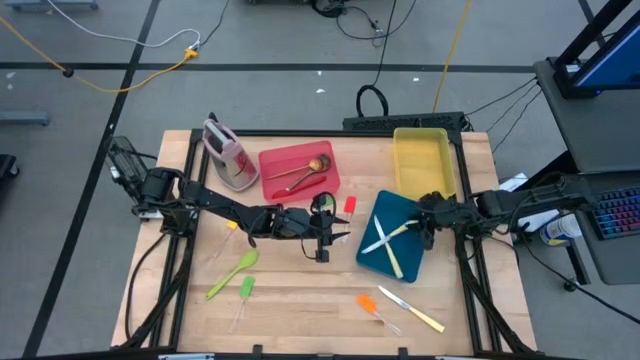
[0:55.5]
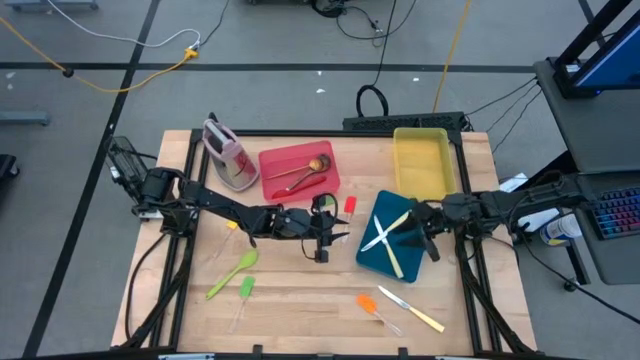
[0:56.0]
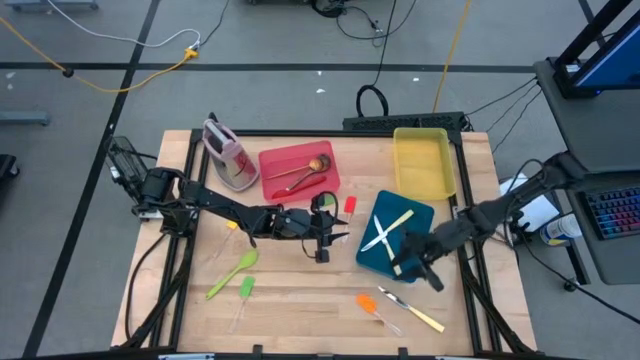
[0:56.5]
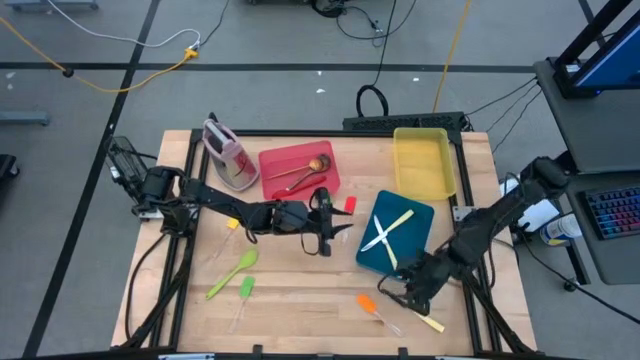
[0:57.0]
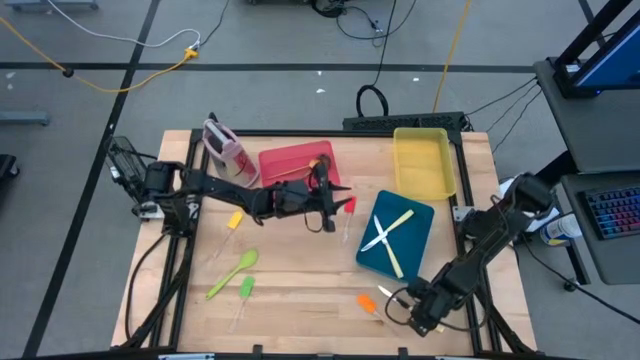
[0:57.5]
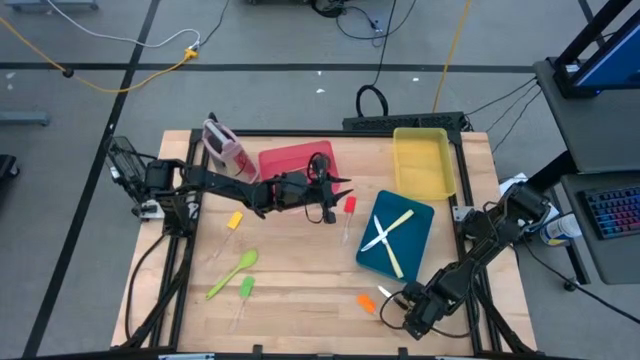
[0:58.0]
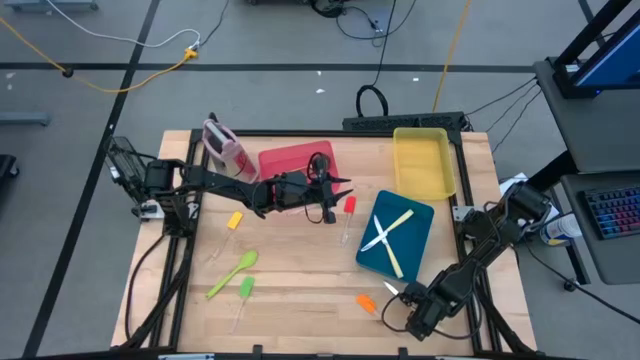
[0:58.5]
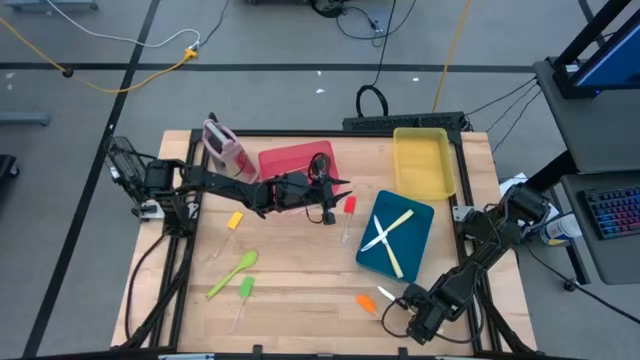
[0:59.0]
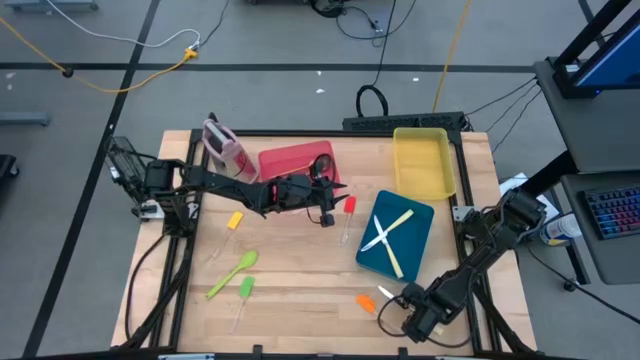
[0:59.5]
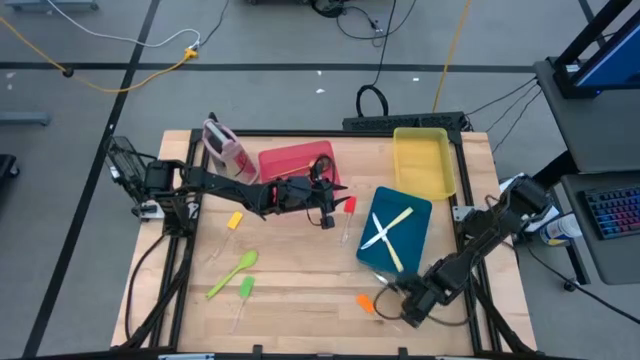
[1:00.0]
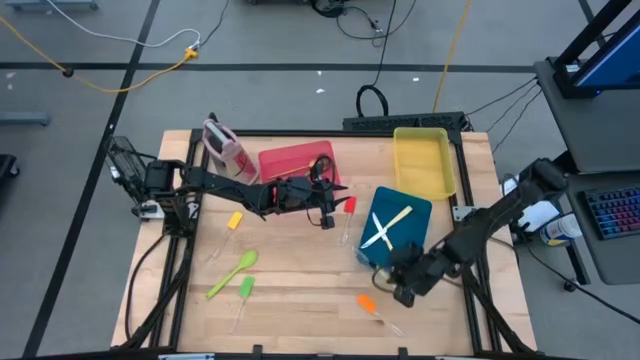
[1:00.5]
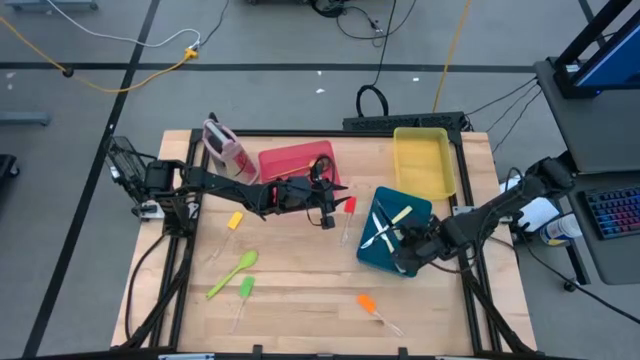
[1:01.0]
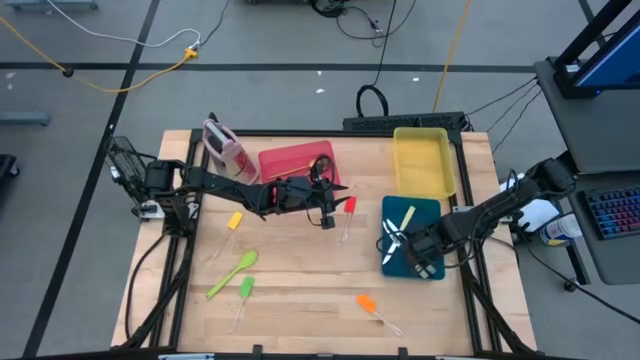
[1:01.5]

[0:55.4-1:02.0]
Task: Pick & Place Kitchen Items
Put the yellow knife into the blue bin

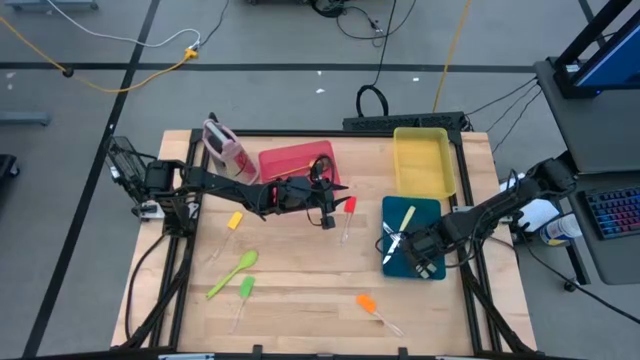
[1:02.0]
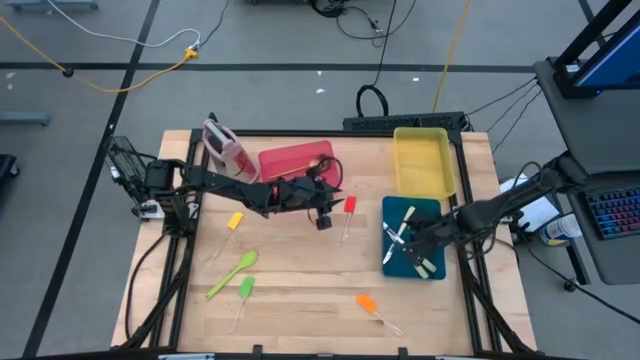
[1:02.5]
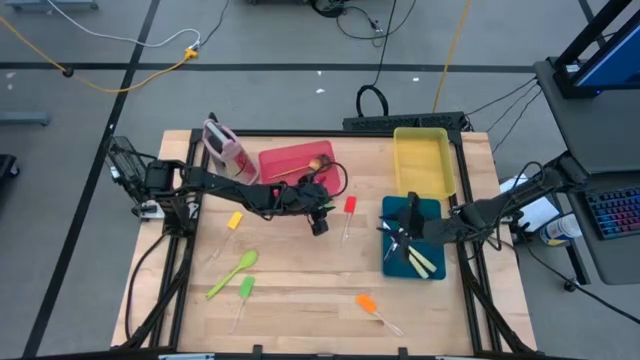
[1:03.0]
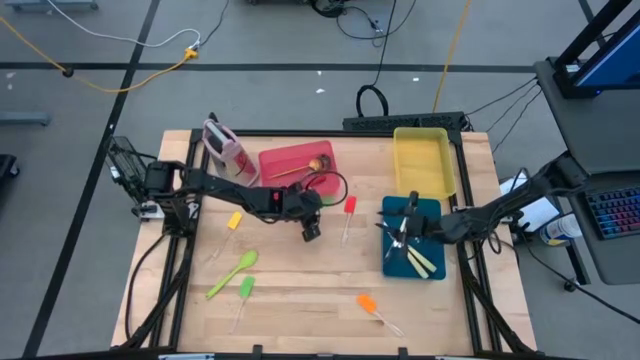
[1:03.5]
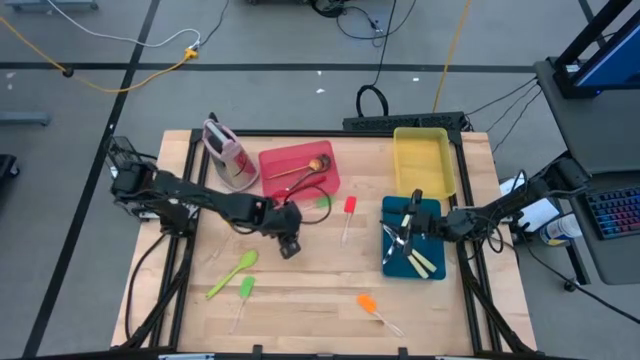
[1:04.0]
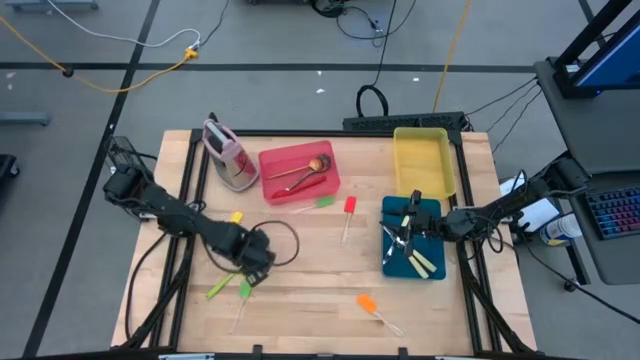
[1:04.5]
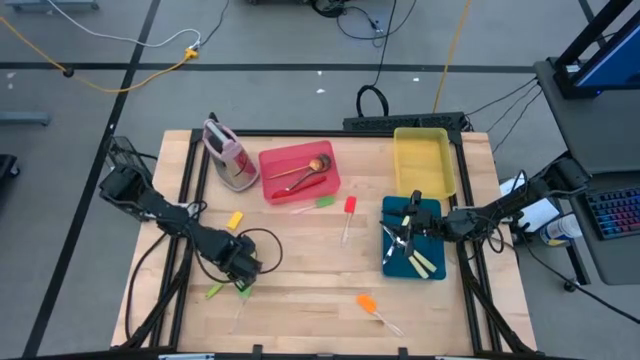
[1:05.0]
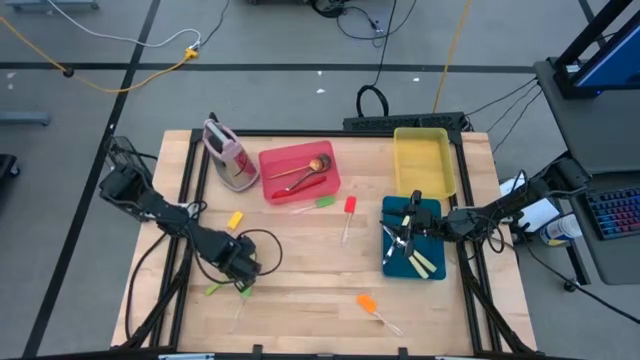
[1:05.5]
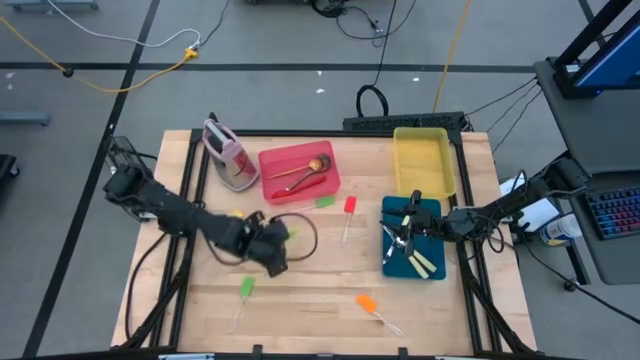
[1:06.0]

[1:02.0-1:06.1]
Put the green serving spoon into the red bin

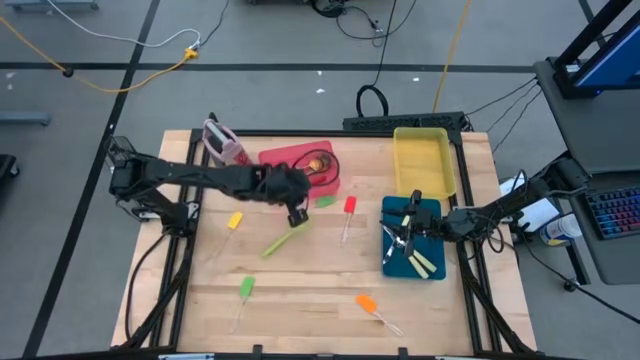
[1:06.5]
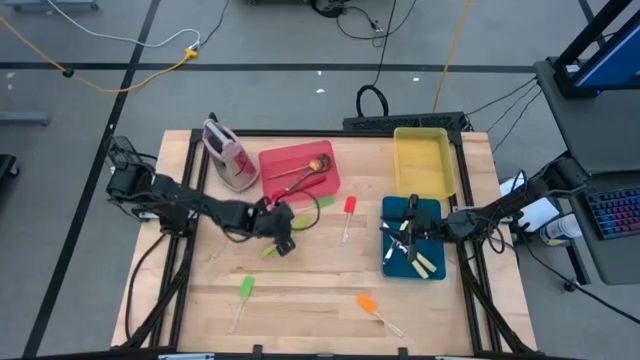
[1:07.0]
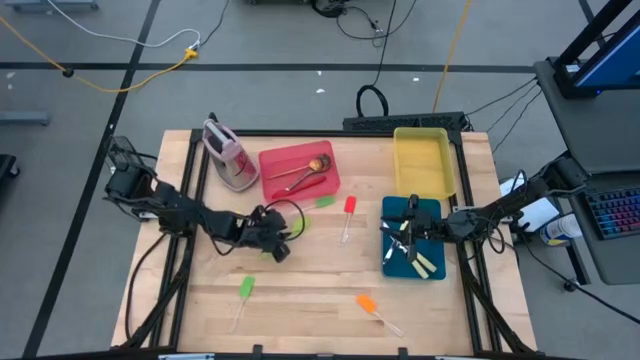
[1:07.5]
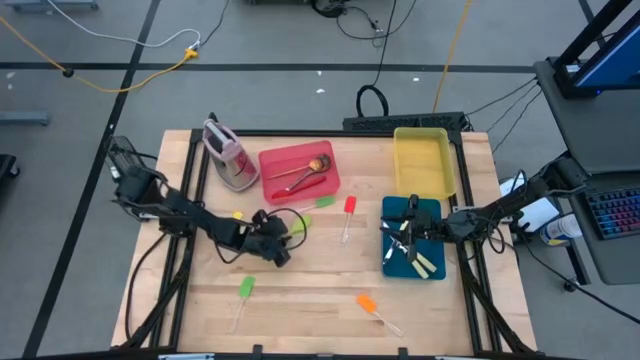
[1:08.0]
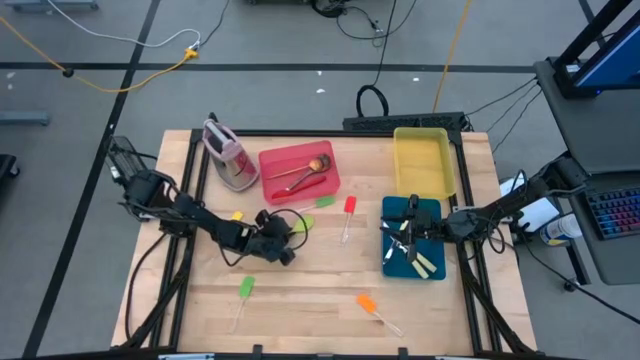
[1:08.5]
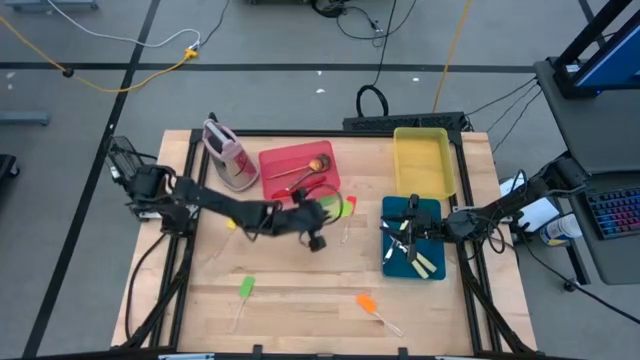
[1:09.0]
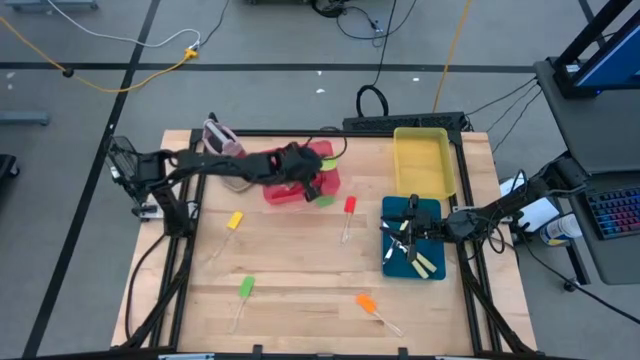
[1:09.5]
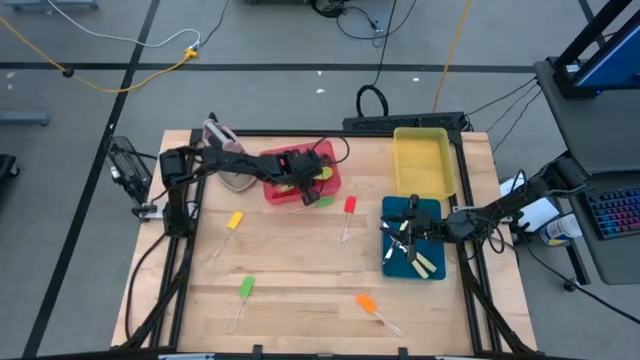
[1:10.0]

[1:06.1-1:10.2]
Put the green serving spoon into the red bin

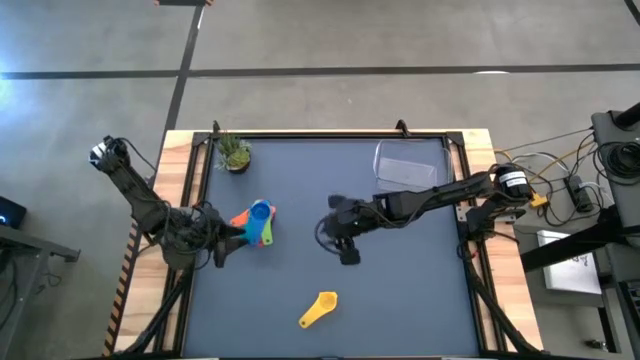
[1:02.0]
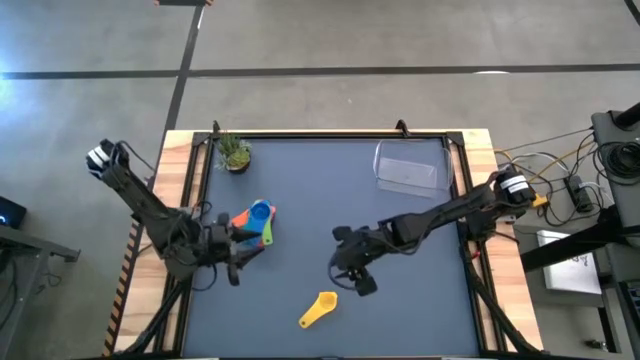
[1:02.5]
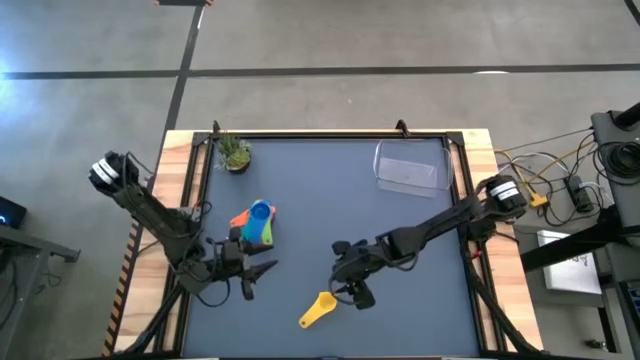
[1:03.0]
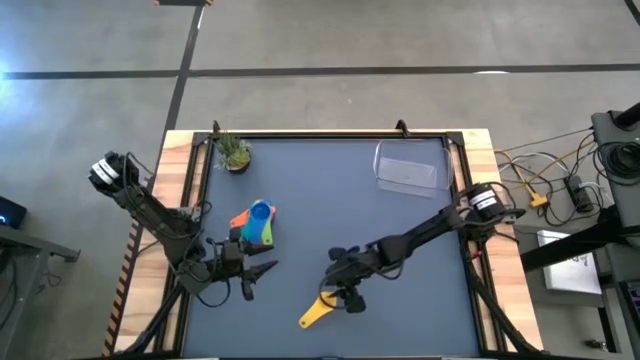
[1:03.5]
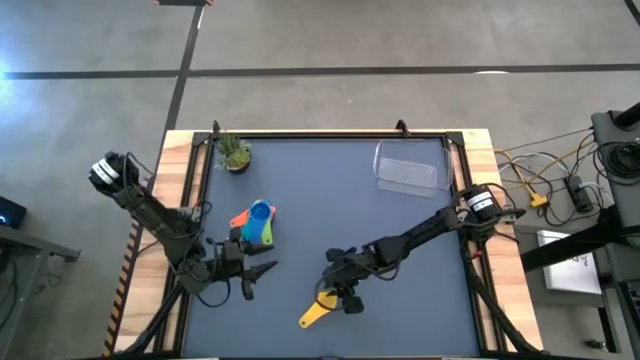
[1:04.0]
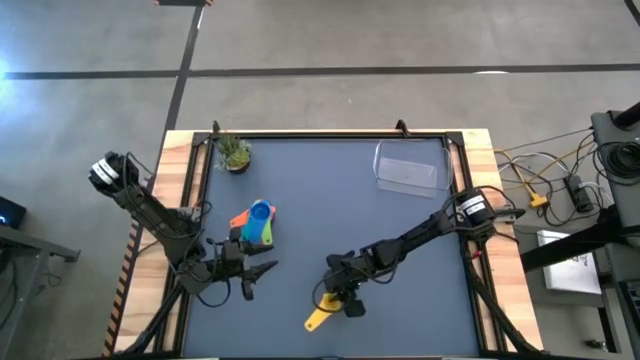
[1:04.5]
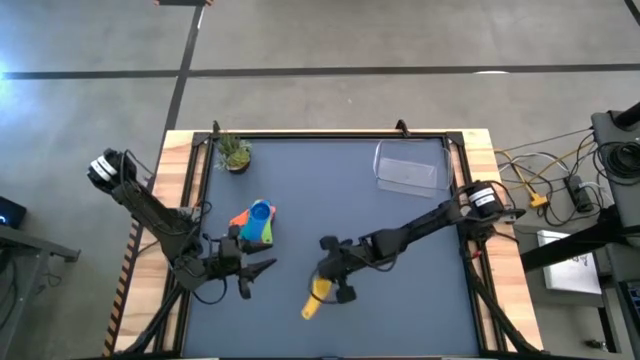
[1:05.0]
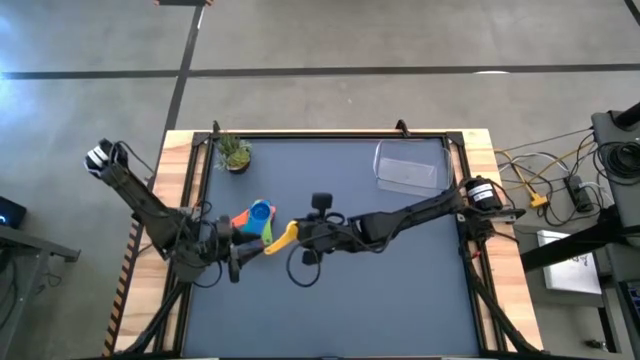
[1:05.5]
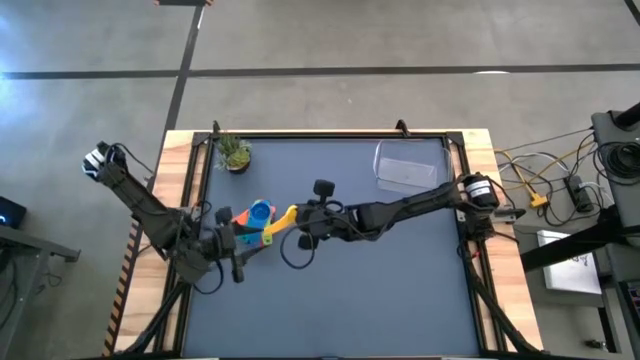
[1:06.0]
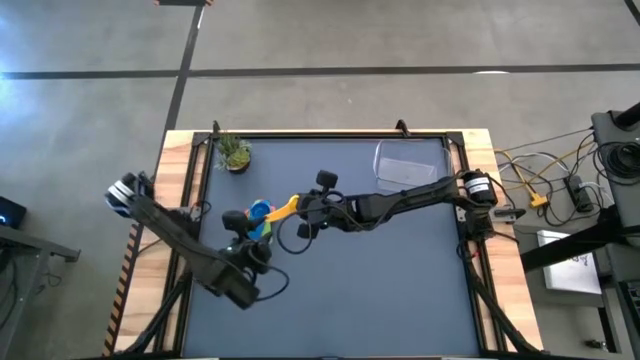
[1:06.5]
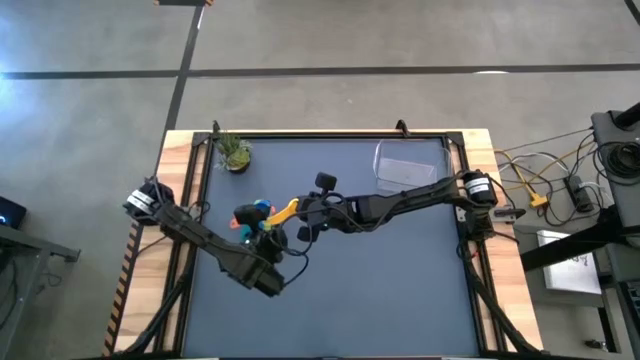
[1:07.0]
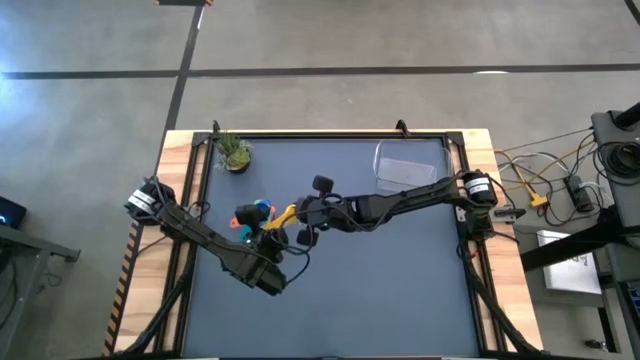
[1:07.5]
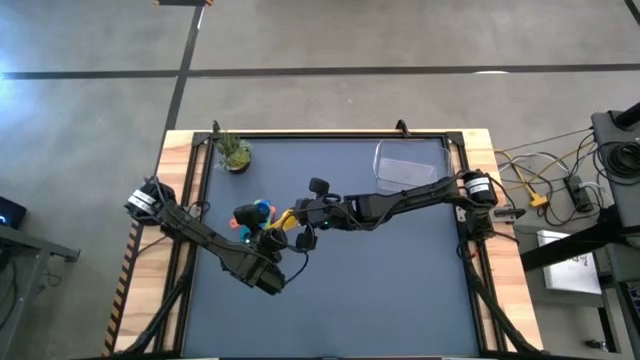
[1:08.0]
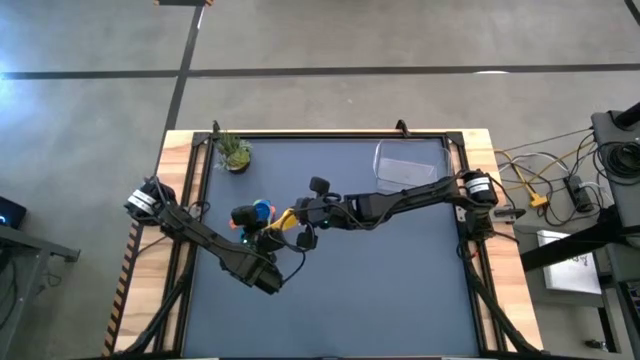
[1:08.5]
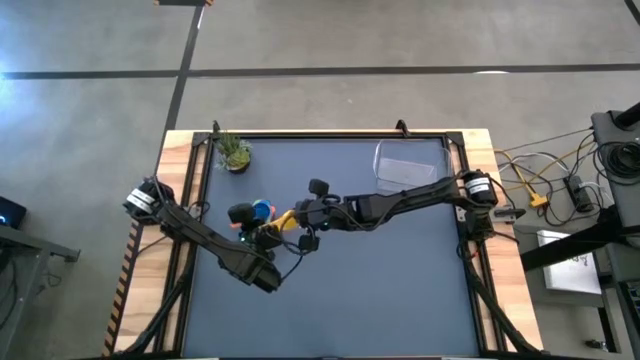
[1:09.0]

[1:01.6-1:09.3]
Task: Nest measuring cups in basket
Stack the yellow measuring cup on top of the dark blue measuring cup
